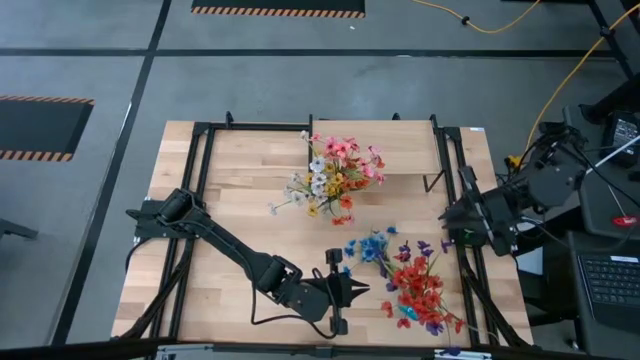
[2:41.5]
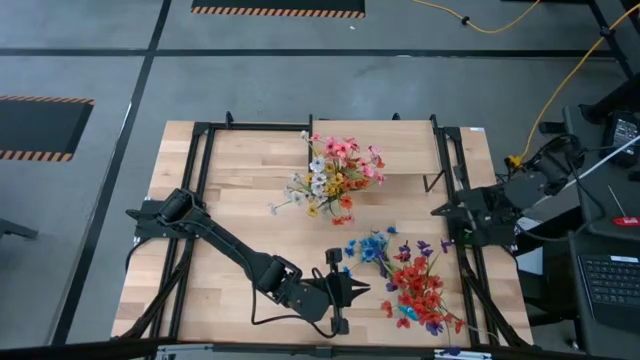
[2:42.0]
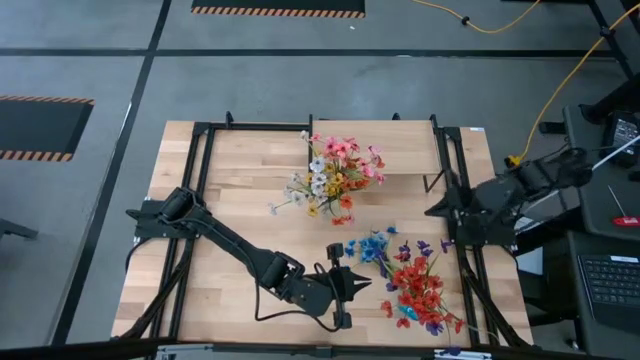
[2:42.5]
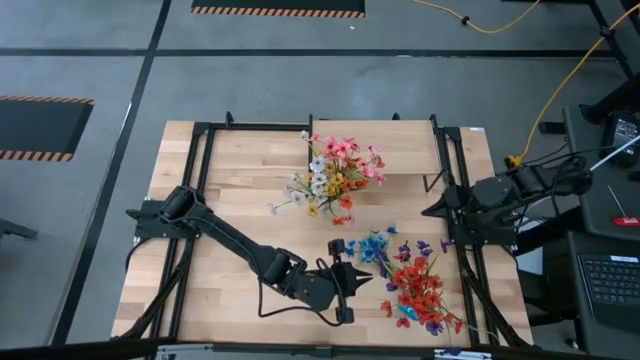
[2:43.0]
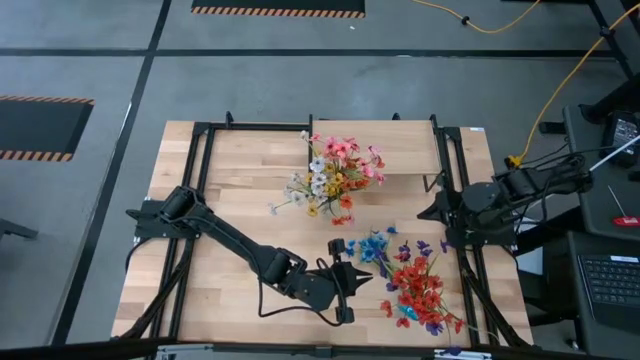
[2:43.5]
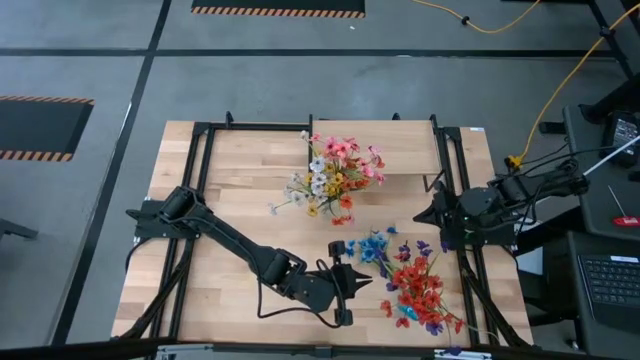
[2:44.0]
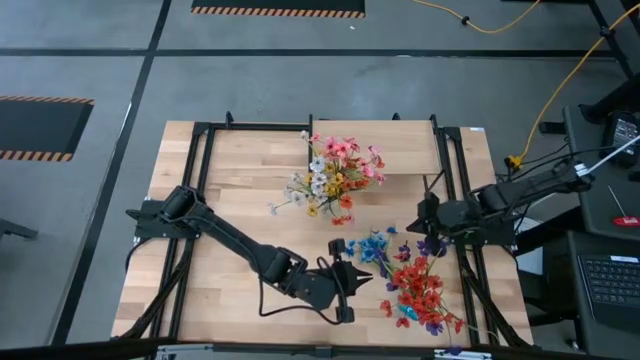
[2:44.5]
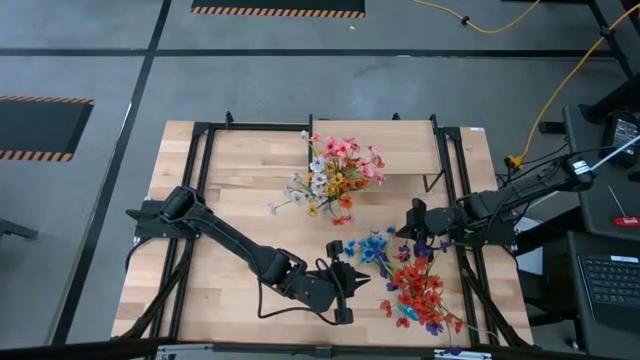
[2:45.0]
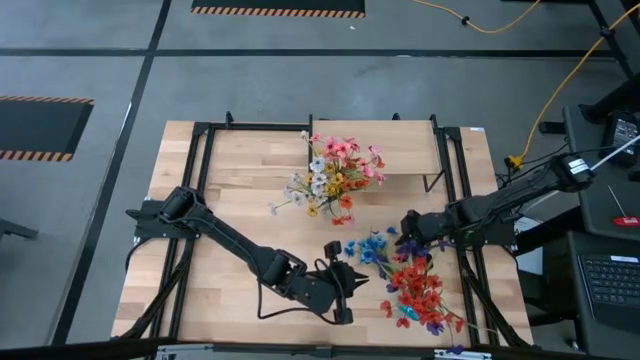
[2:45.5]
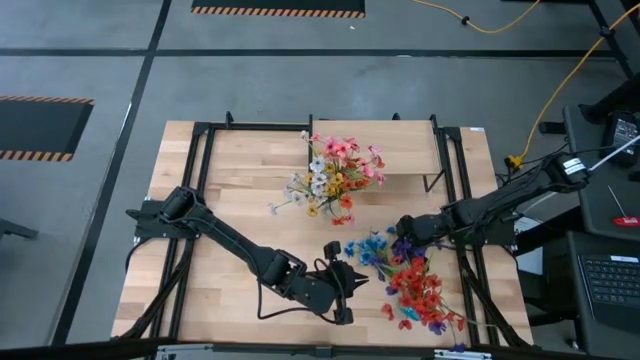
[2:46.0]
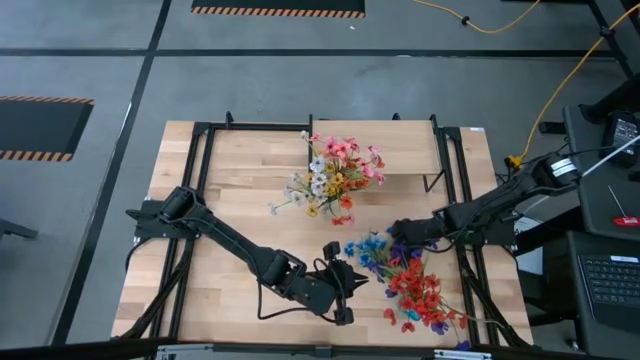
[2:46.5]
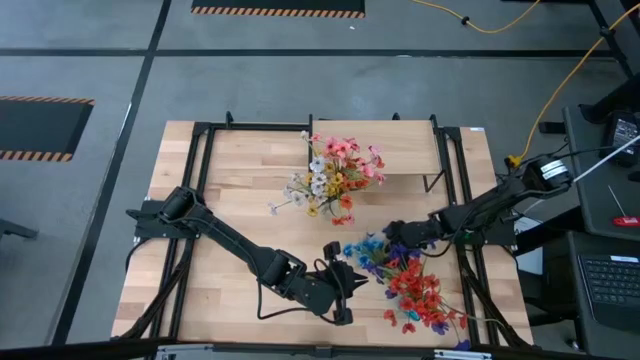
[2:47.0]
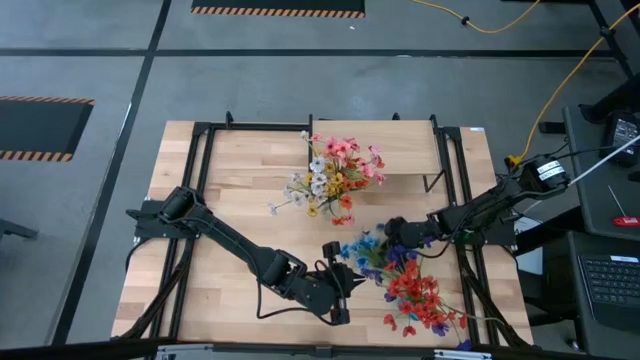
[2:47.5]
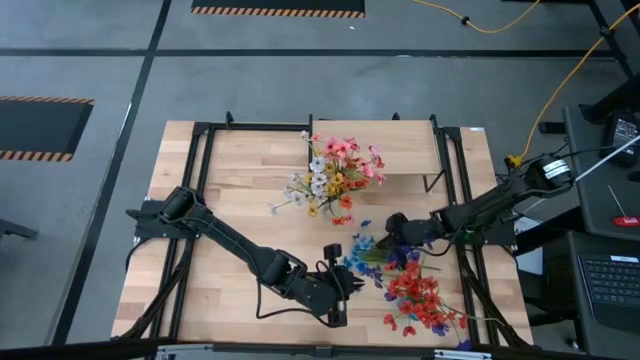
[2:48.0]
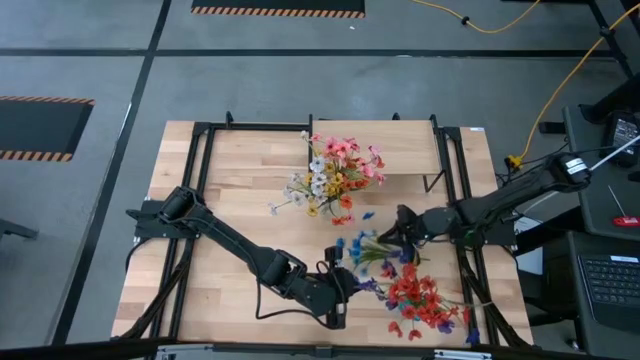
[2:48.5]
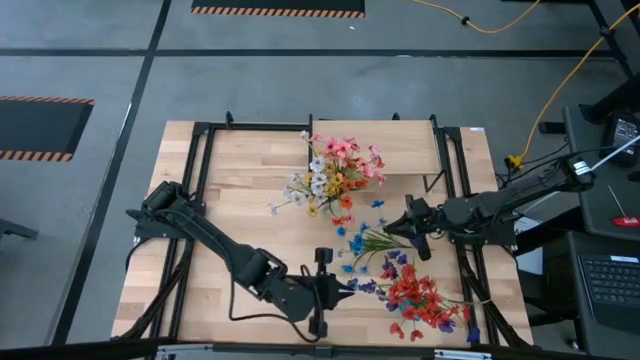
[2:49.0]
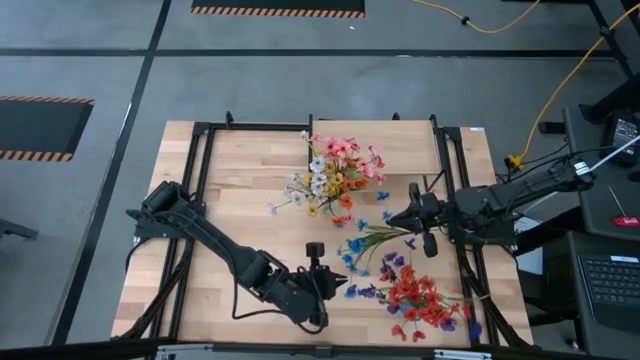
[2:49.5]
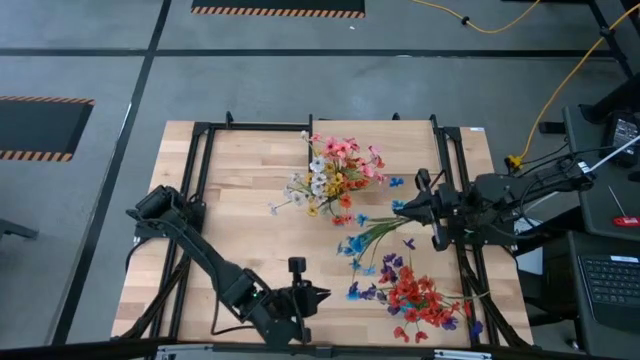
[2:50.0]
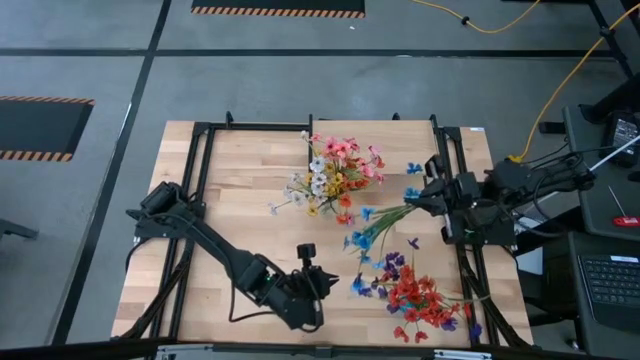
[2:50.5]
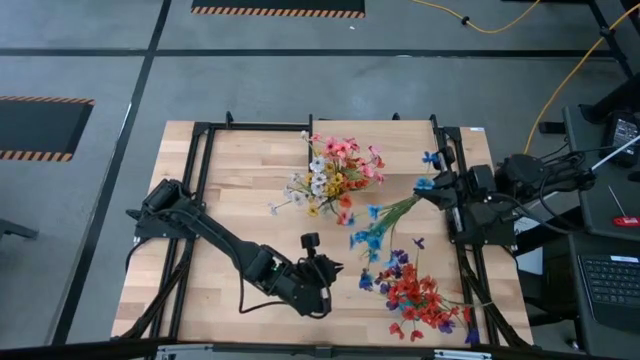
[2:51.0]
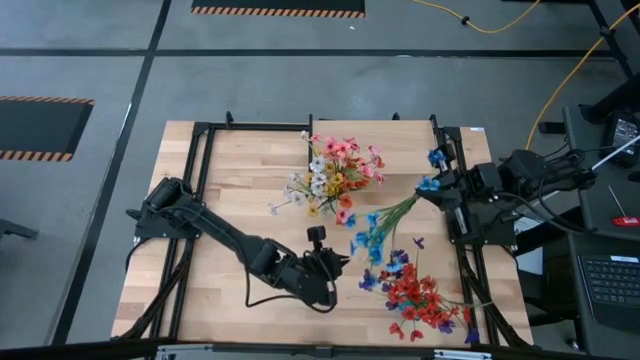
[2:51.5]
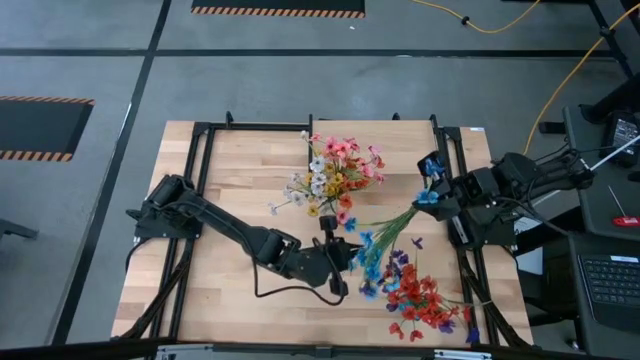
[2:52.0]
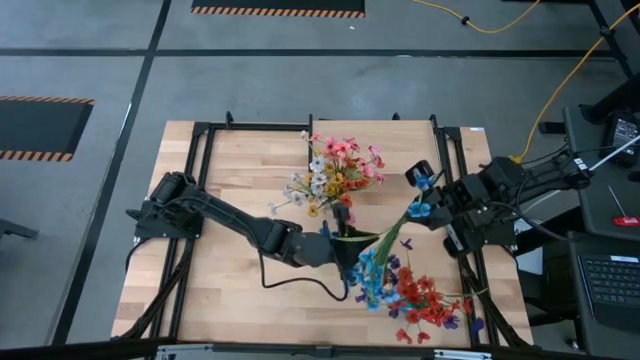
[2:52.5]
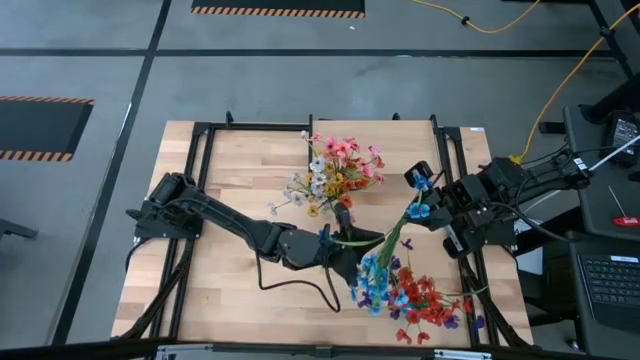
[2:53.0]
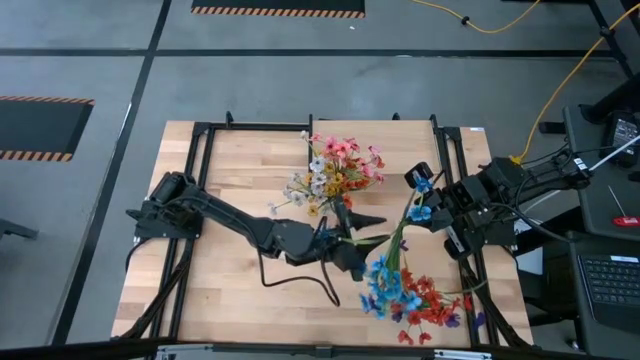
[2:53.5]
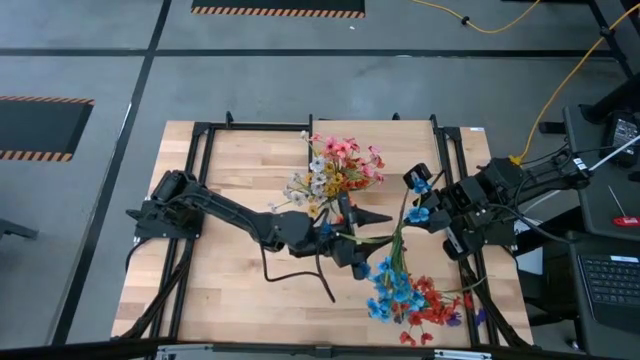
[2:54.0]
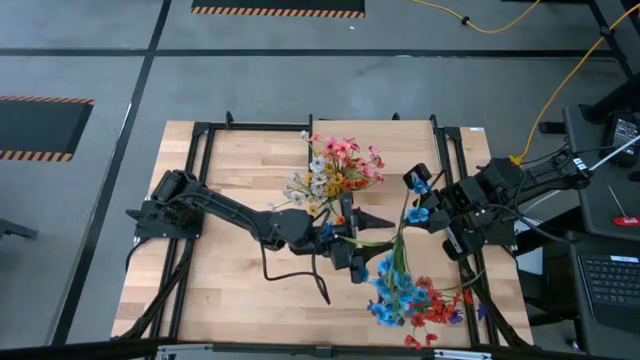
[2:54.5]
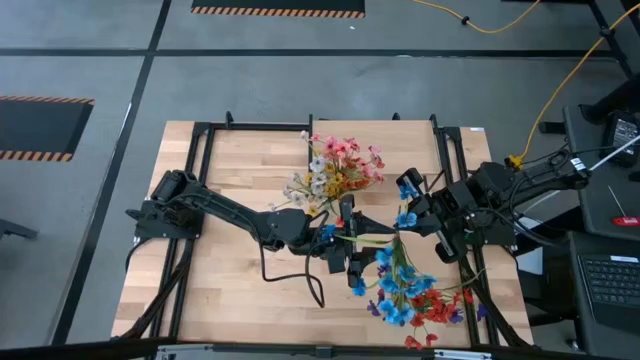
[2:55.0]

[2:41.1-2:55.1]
Task: Pick and place flowers into a vace then onto a shelf
Put the blue flowers into the blue vase

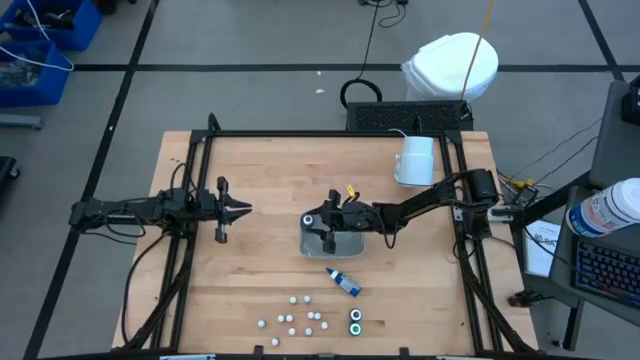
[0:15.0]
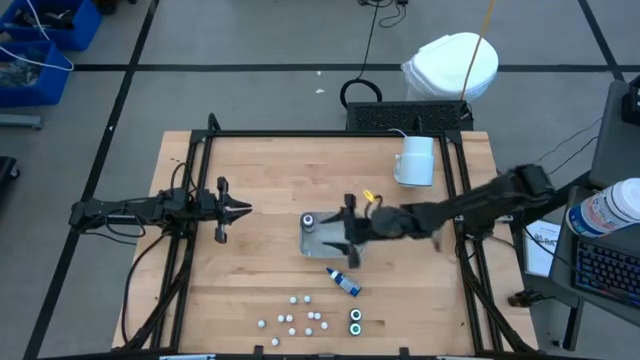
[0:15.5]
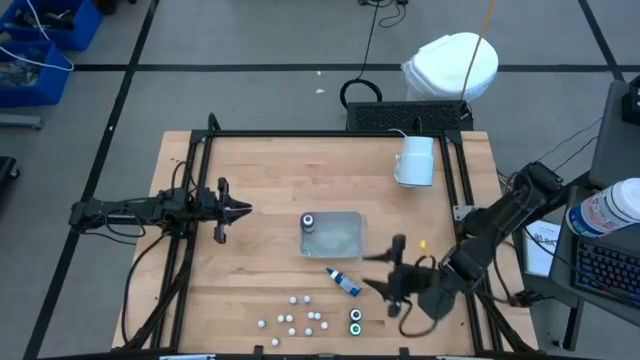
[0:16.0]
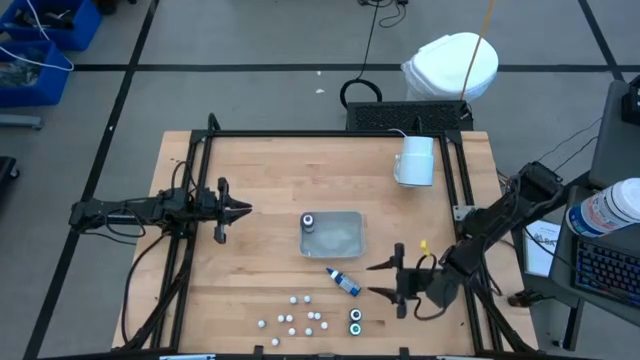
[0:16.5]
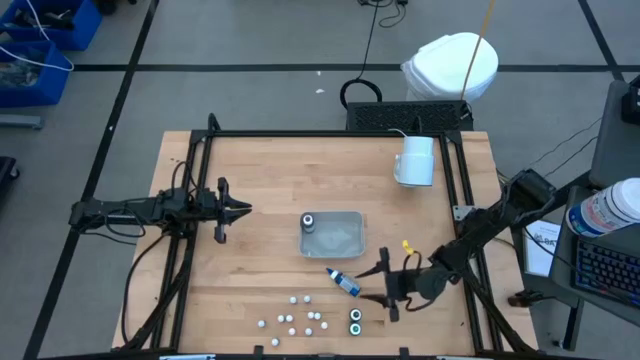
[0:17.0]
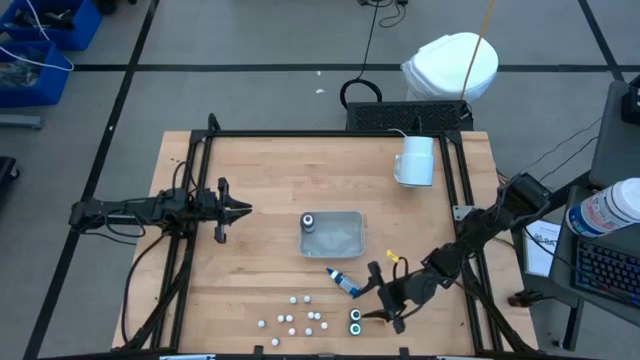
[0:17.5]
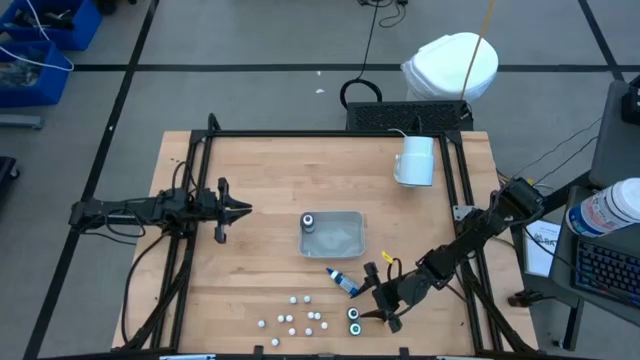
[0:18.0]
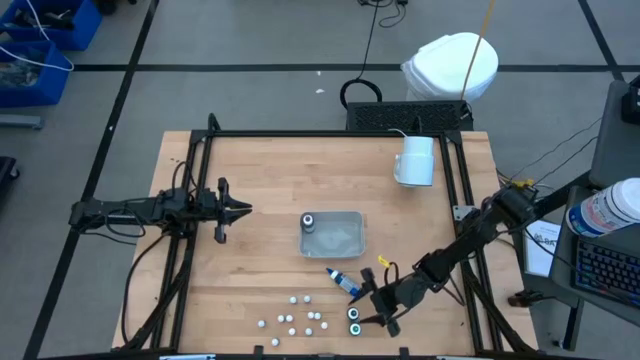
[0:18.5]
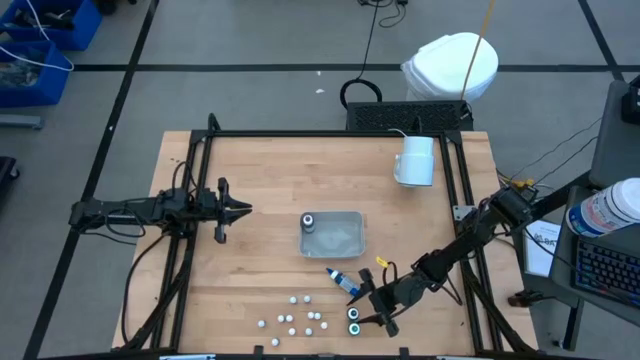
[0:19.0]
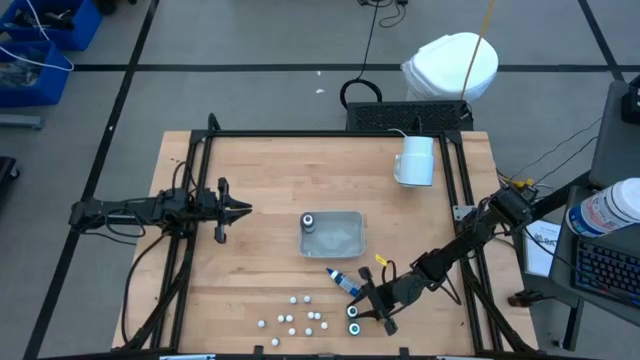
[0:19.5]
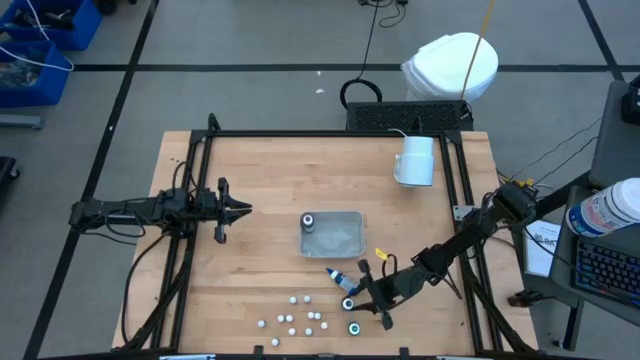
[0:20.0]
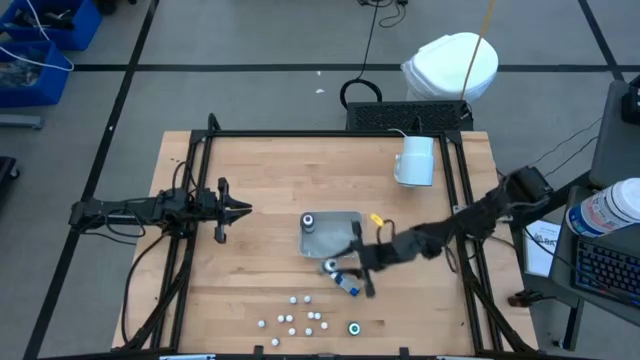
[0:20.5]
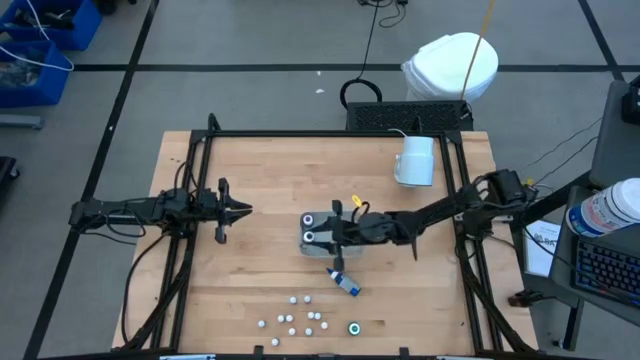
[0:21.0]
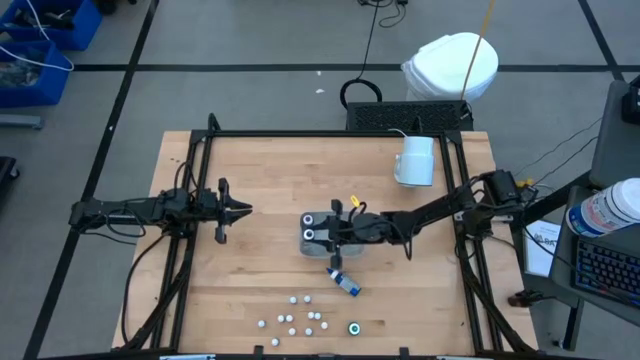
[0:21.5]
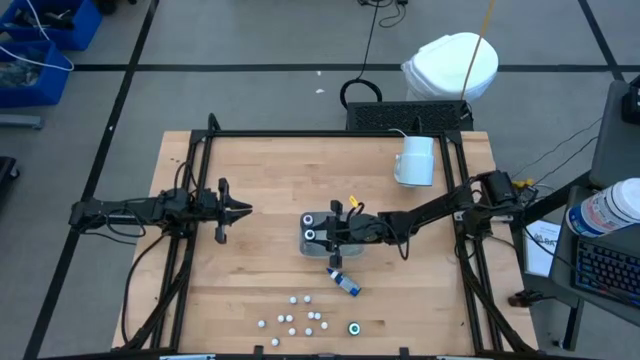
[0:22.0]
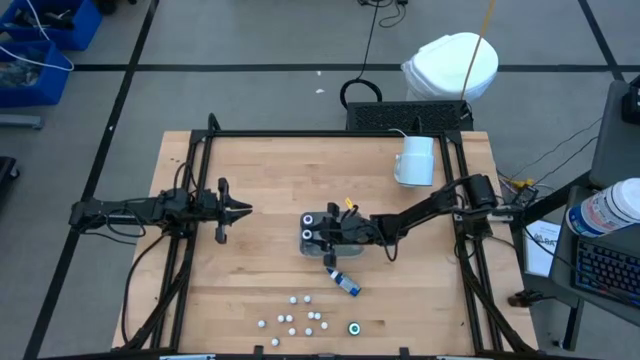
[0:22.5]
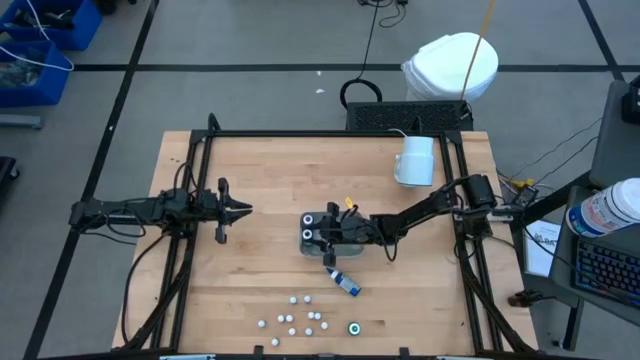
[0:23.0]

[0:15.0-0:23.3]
Task: Pick & Place food coloring
Put the big black food coloring into the gray bin
